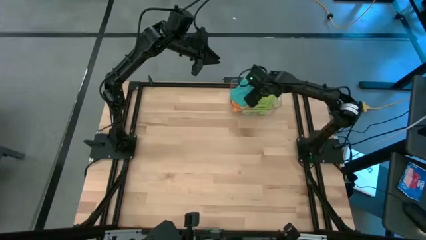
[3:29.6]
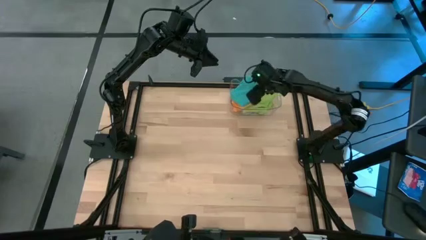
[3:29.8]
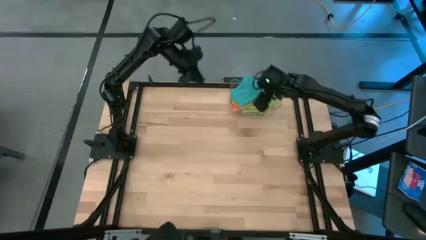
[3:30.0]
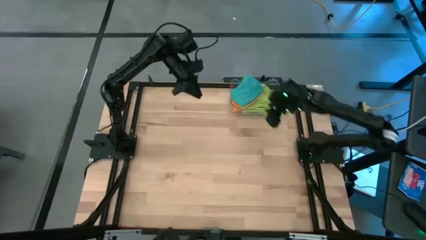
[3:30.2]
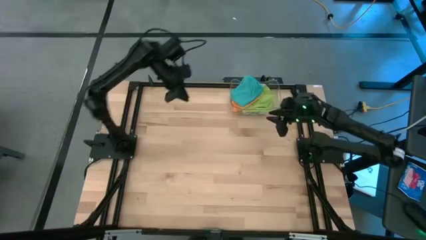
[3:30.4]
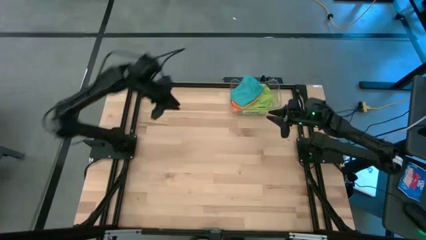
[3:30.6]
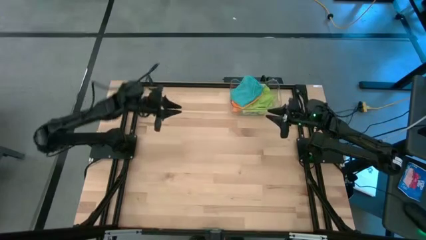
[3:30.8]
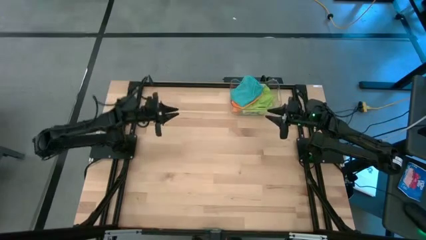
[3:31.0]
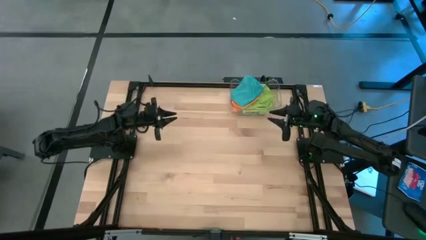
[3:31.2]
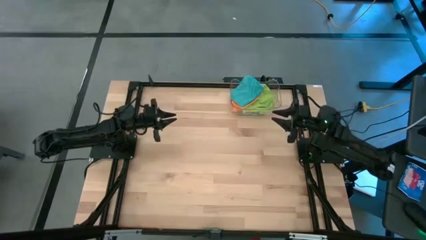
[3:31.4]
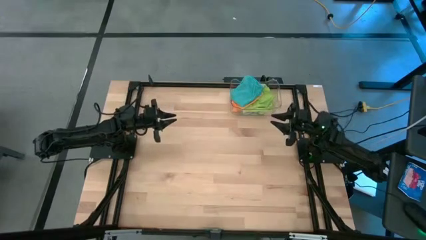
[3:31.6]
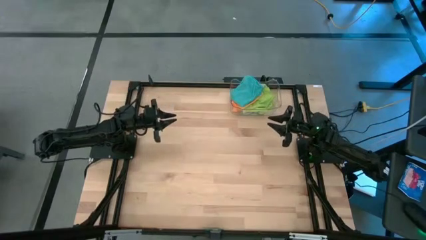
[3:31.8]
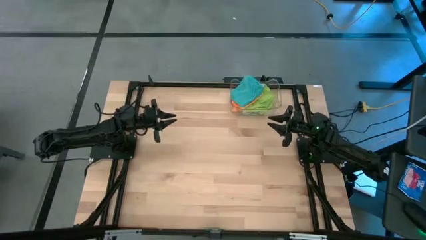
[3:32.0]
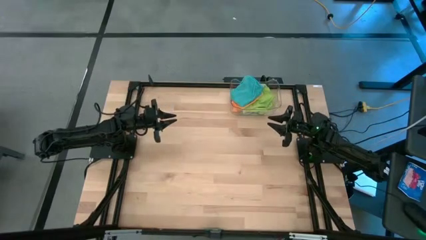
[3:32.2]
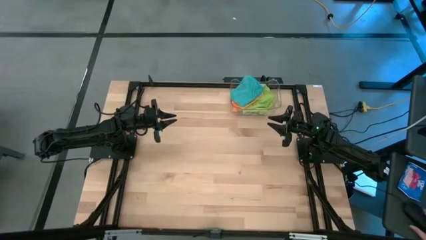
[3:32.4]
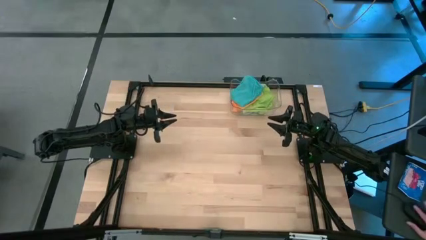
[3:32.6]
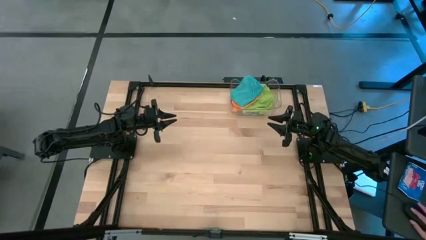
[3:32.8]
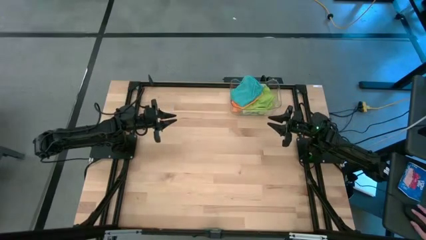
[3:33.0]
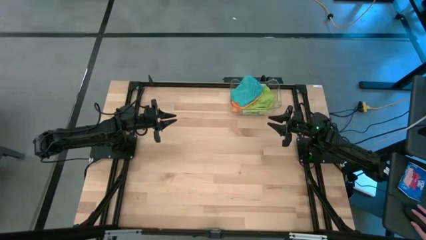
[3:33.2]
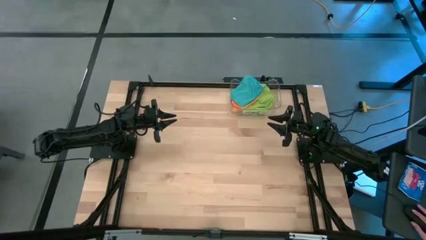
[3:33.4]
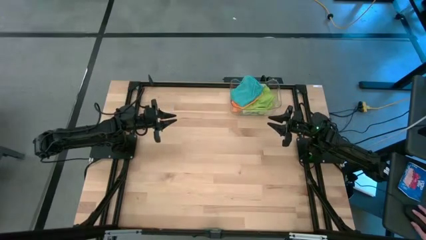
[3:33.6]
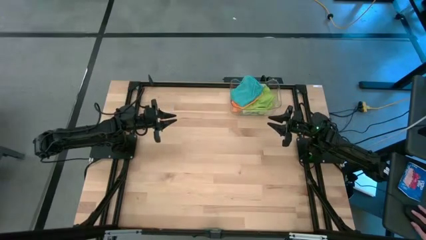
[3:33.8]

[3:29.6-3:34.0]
Task: Fold microfiber towels
Return to Home Position

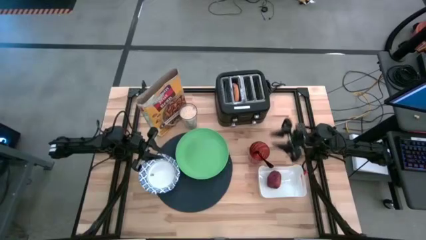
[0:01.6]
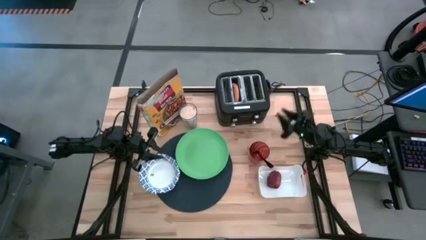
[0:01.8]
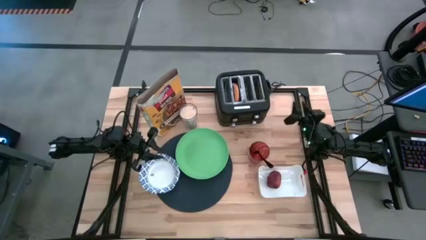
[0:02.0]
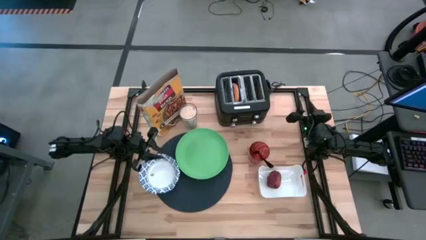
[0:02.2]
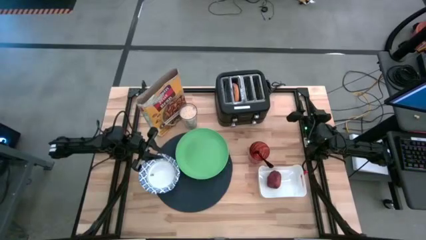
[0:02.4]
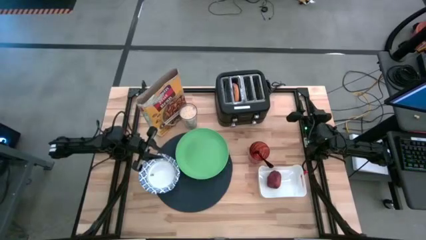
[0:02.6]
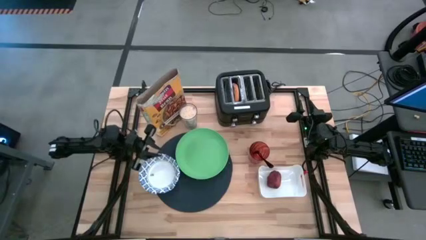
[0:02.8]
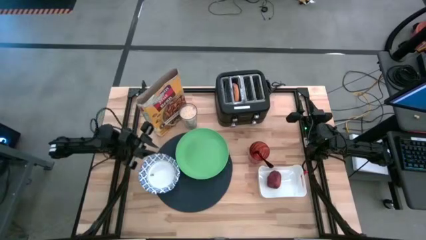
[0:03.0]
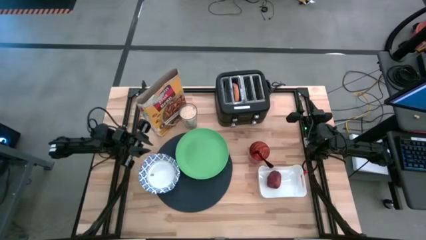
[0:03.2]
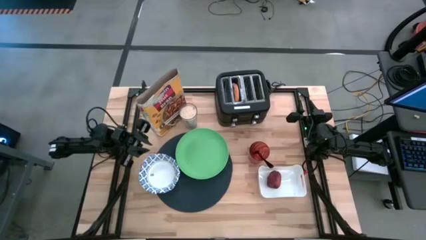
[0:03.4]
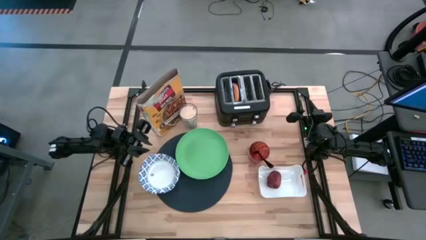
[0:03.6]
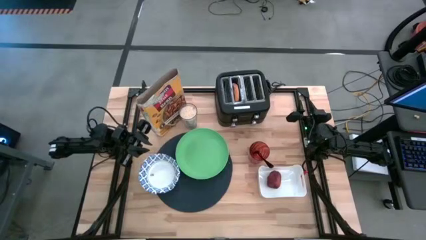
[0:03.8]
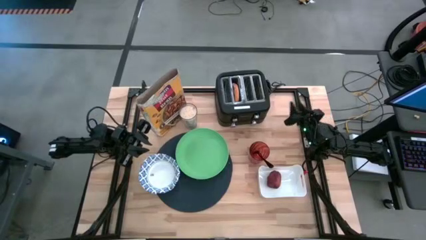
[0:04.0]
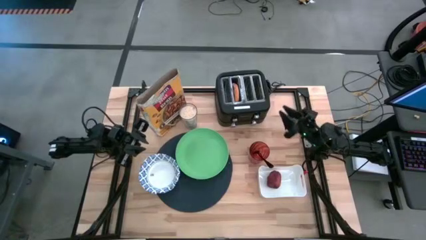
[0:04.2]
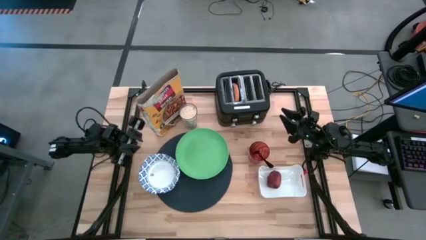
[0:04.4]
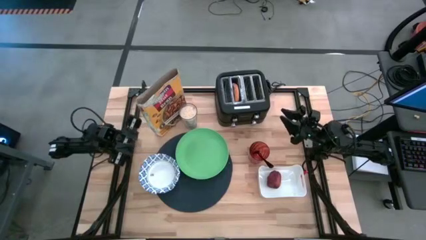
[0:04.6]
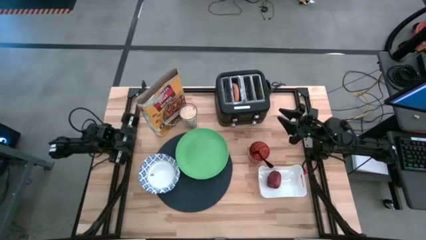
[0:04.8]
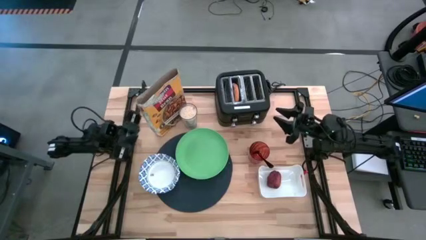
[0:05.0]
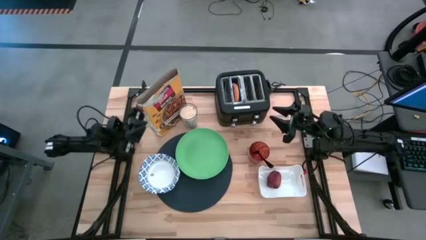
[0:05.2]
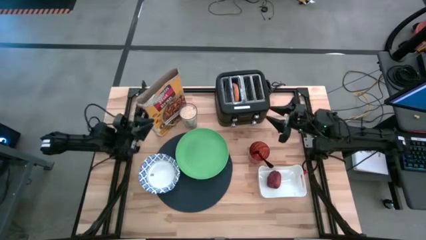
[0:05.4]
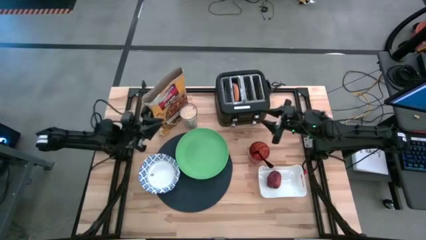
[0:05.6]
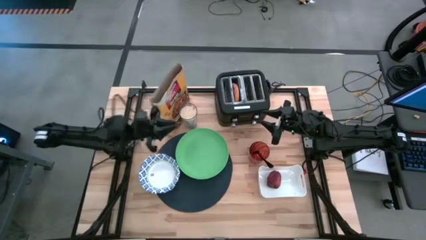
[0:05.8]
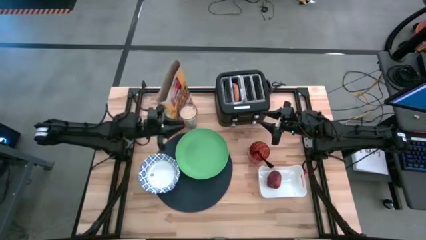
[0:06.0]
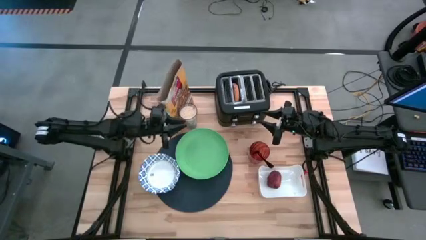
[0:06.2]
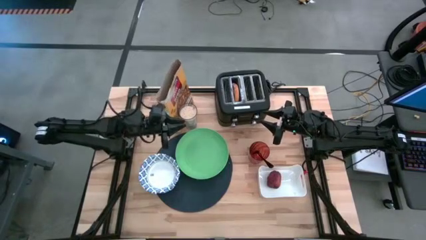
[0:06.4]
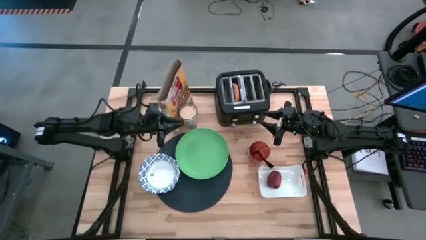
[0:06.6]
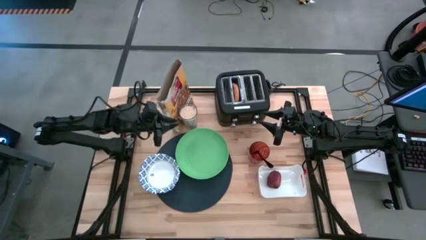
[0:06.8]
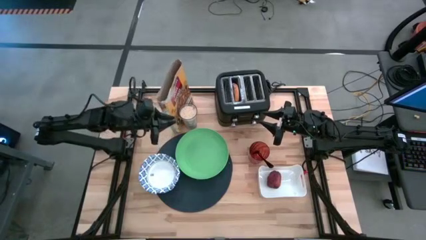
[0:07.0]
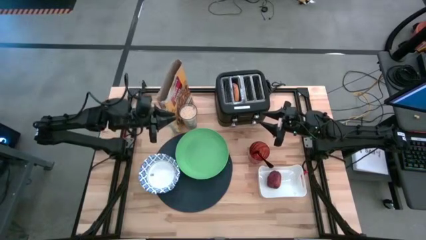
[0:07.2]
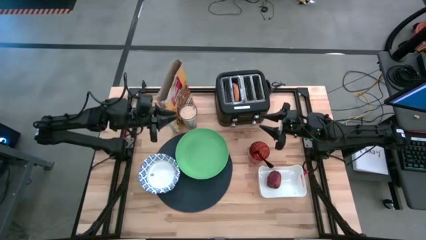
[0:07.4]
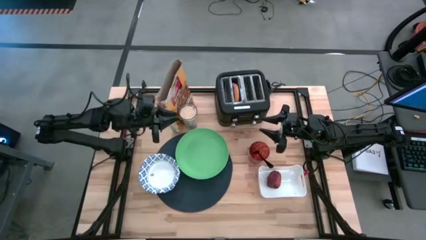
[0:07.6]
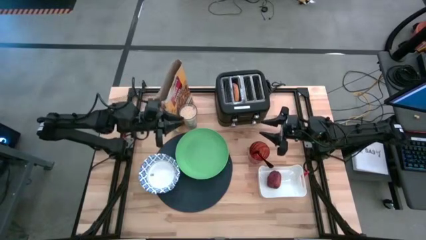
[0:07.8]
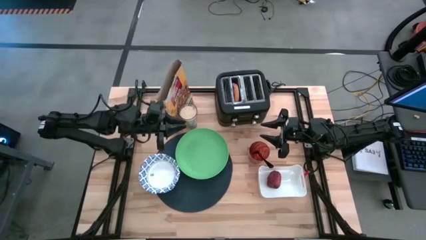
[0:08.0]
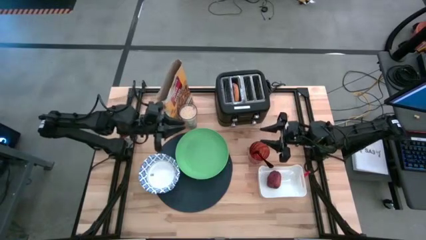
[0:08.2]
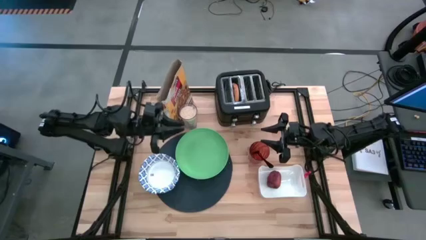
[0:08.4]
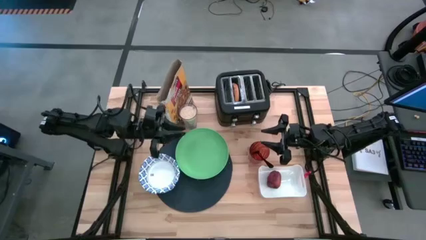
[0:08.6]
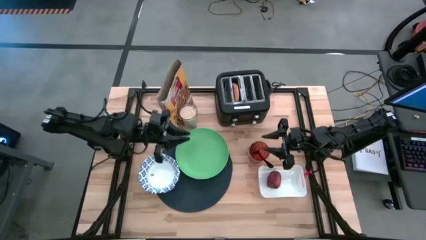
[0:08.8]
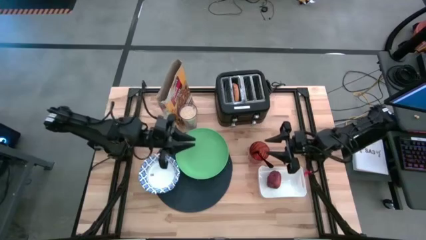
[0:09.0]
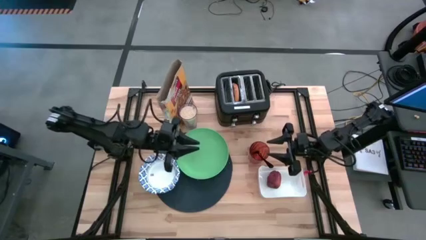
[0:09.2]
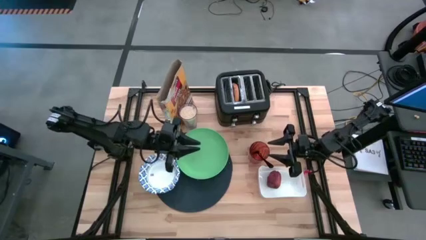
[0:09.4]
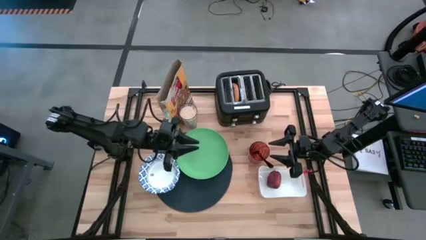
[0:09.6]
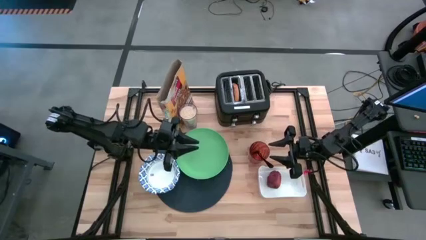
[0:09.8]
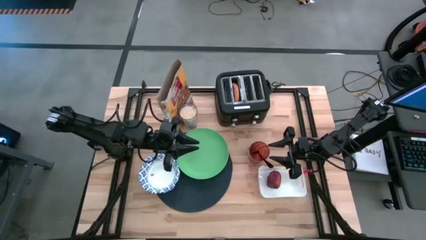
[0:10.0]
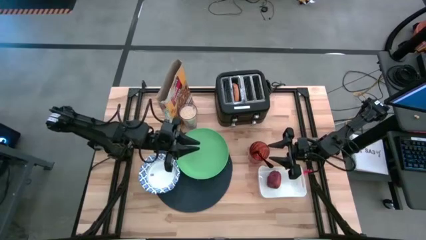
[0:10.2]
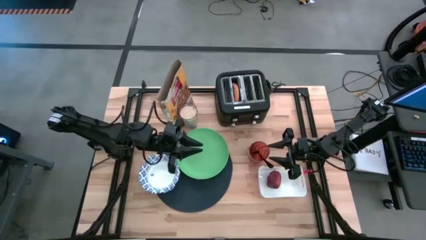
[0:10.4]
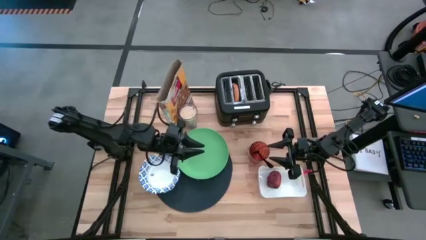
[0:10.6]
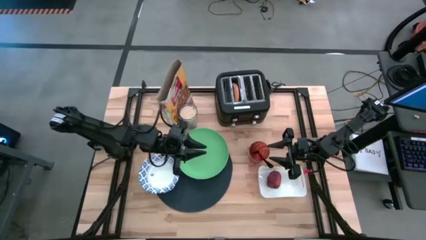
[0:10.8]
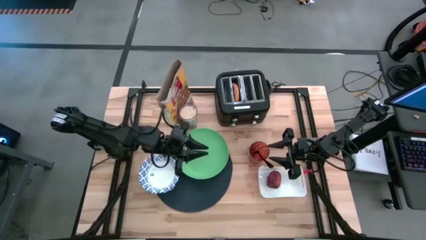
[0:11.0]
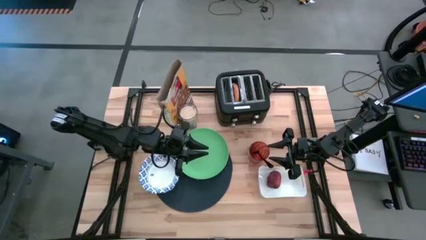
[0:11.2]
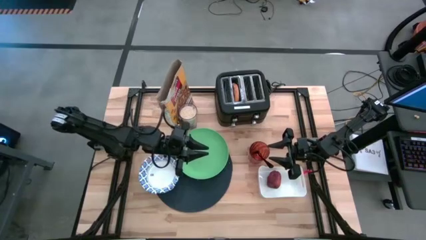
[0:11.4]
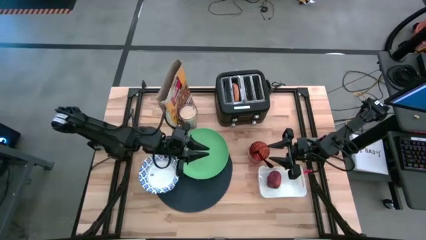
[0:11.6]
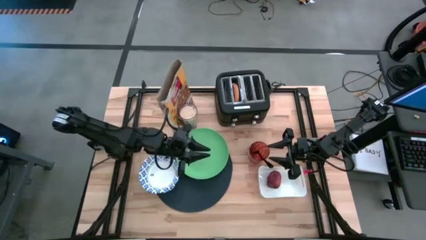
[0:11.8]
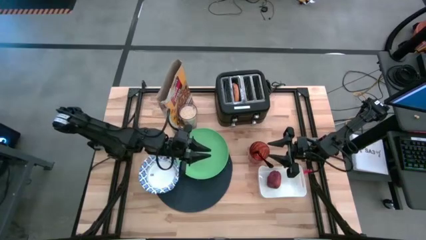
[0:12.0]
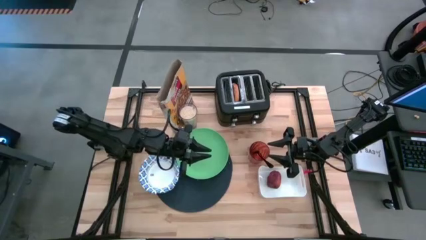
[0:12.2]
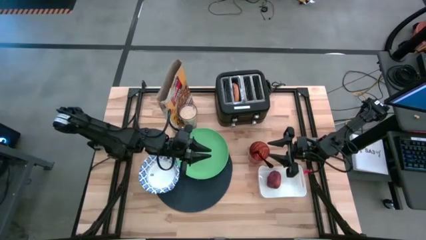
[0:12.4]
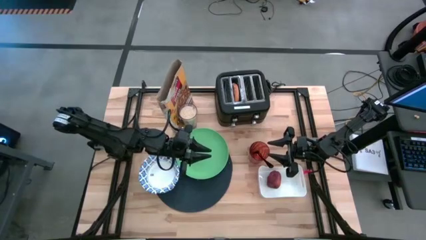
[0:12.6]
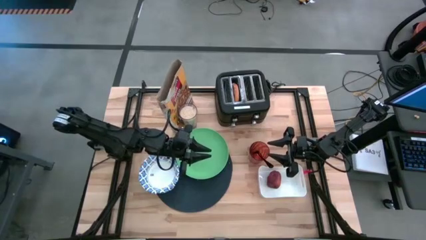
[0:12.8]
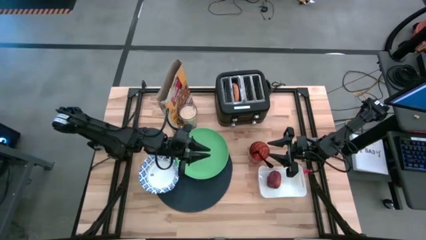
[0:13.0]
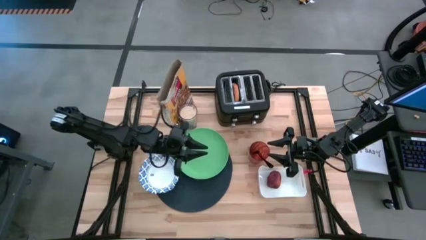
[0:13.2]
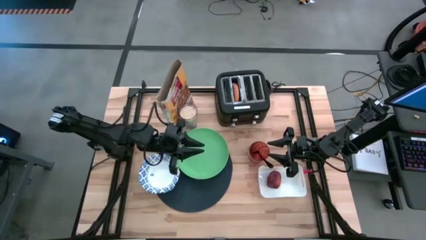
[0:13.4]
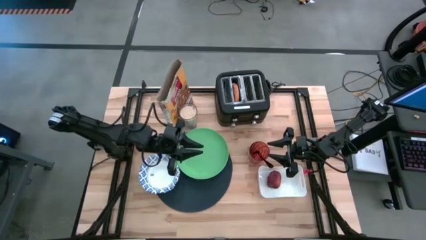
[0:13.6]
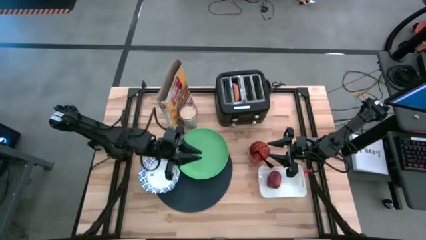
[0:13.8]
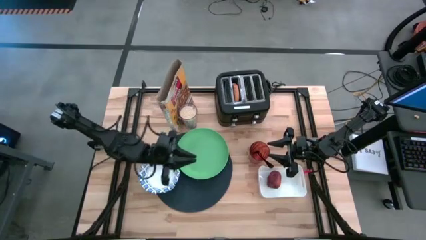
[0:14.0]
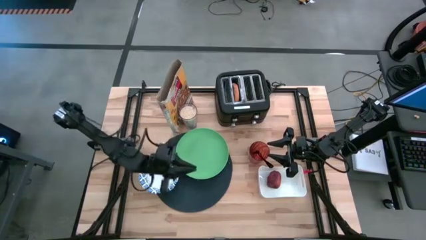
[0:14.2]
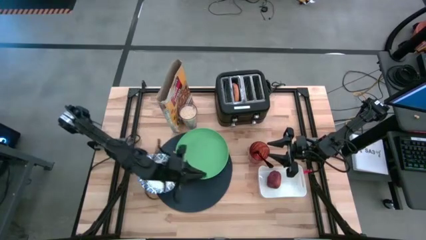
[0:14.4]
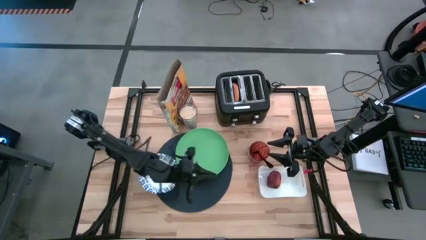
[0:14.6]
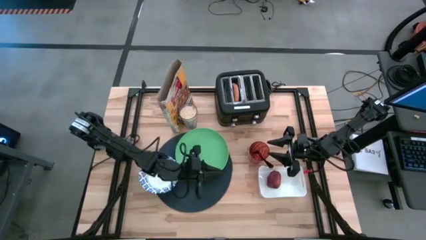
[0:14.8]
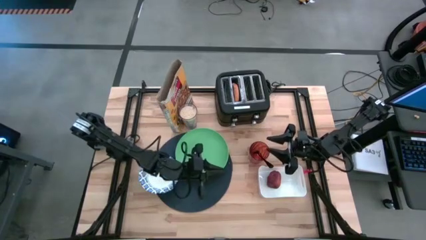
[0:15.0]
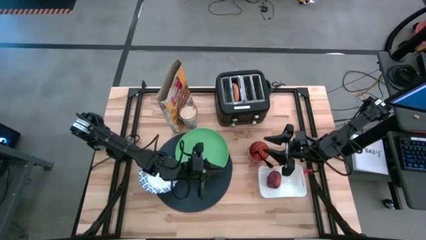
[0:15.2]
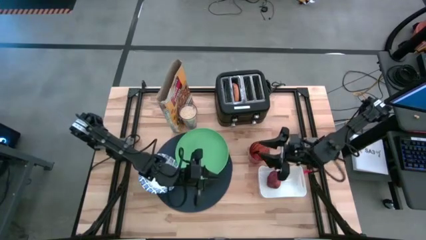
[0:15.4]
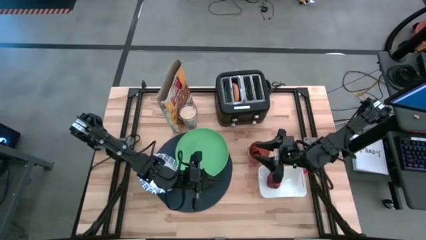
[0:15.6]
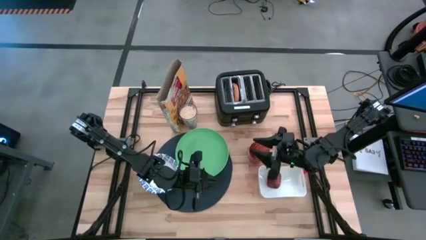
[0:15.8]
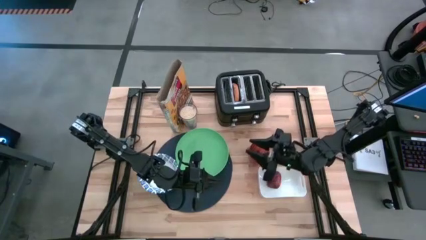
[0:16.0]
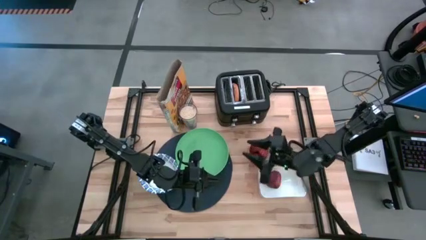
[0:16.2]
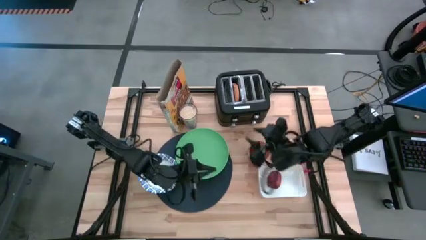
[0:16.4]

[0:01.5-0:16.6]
Task: Arrange a breakfast setting
Pour the cereal from the cereal box into the white bowl
